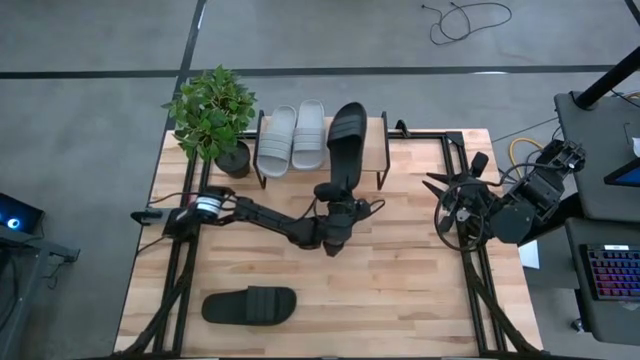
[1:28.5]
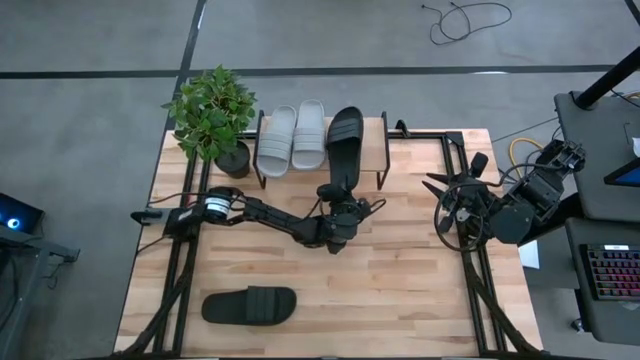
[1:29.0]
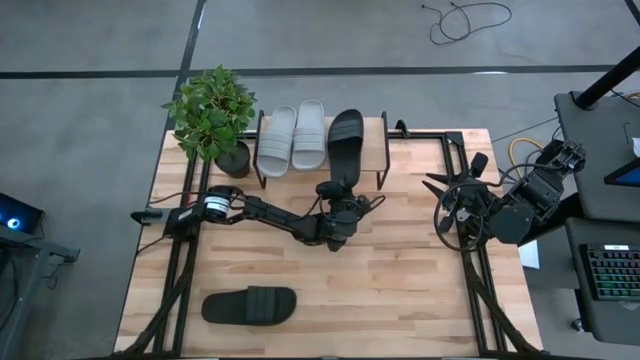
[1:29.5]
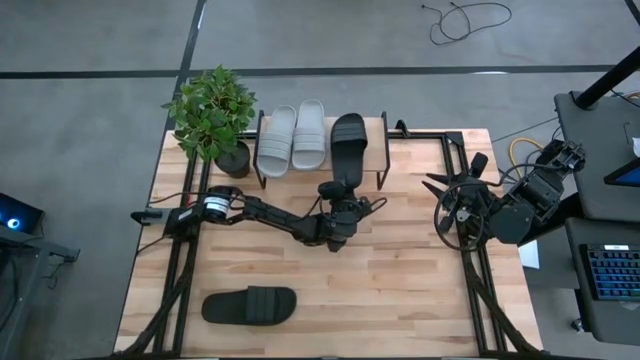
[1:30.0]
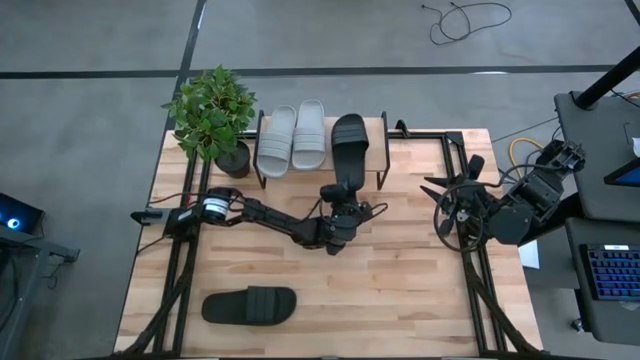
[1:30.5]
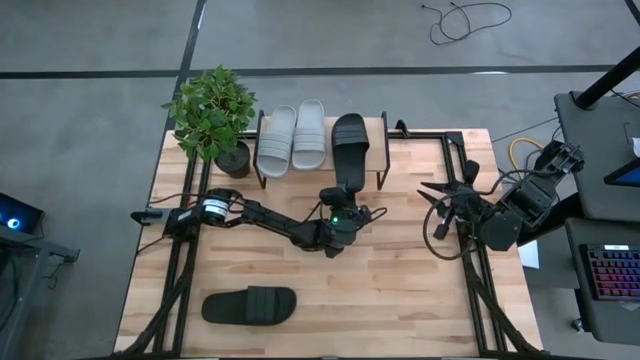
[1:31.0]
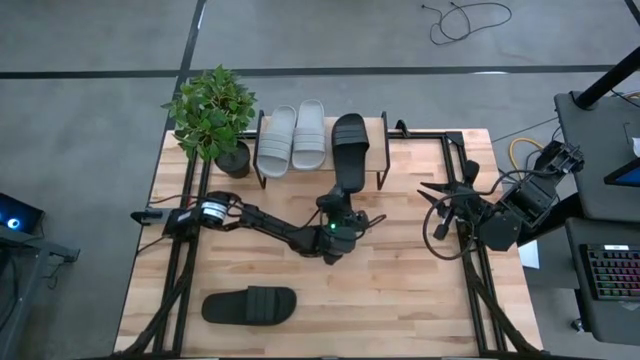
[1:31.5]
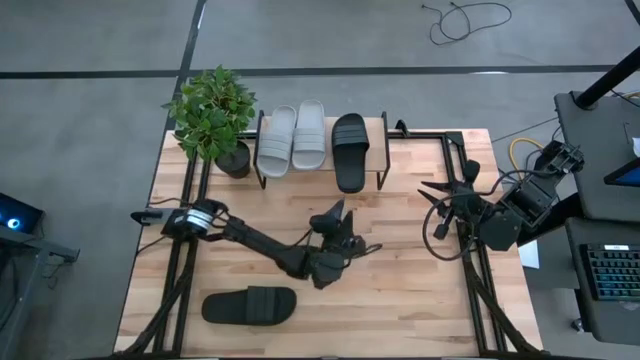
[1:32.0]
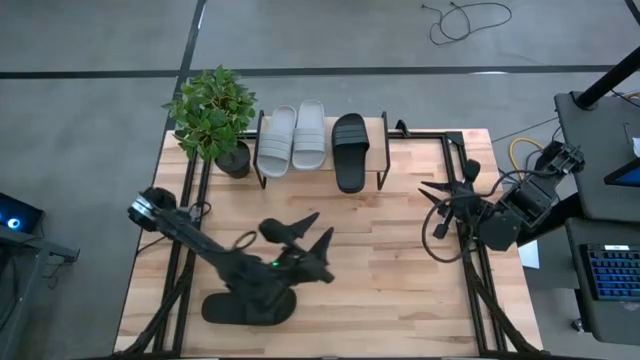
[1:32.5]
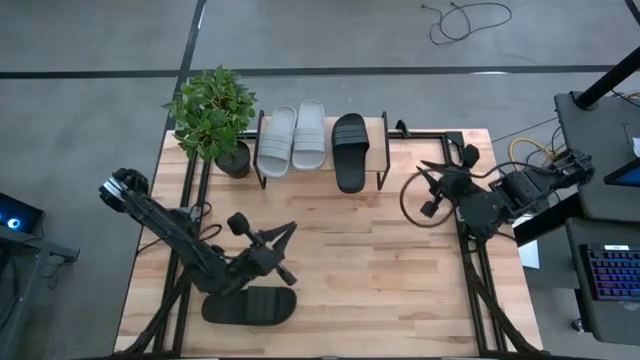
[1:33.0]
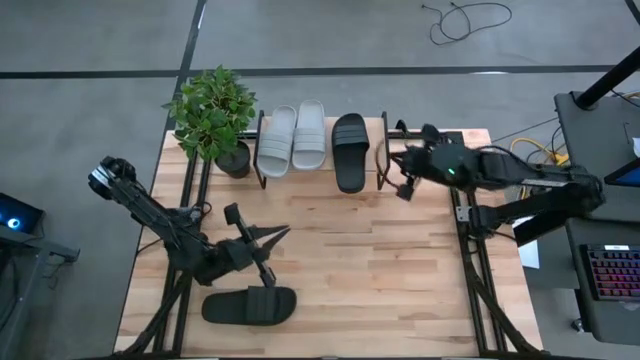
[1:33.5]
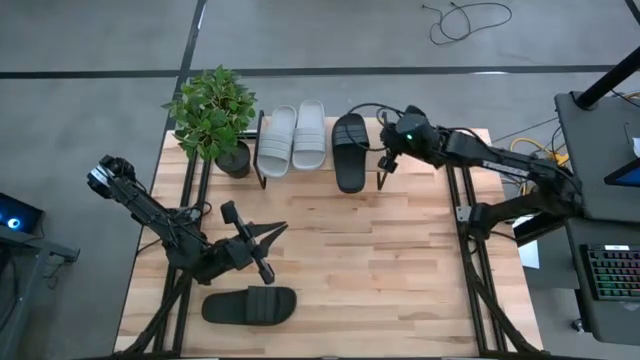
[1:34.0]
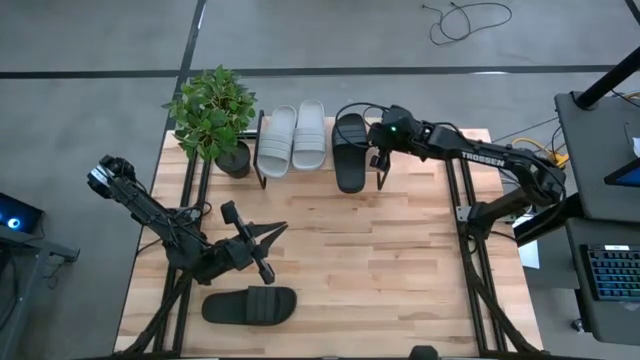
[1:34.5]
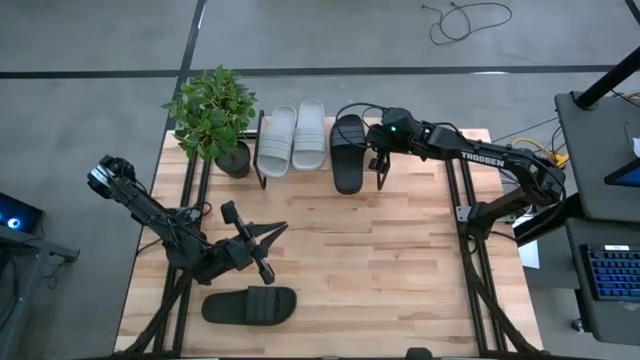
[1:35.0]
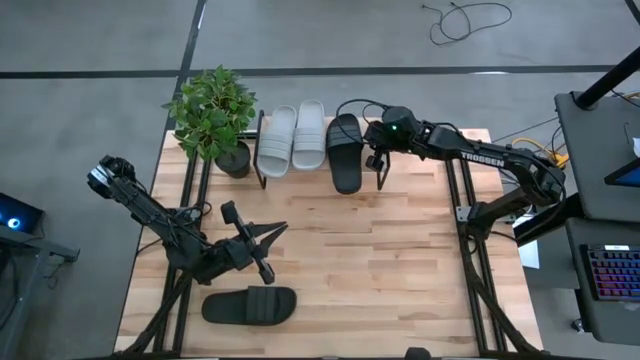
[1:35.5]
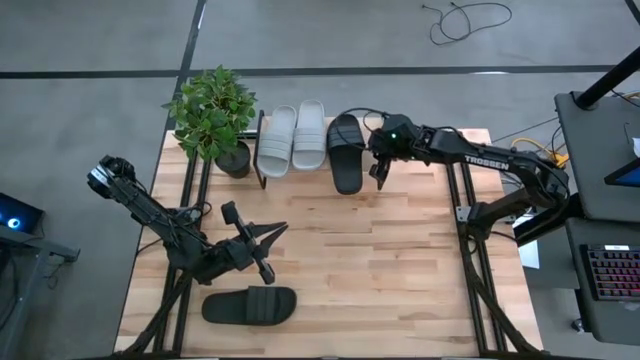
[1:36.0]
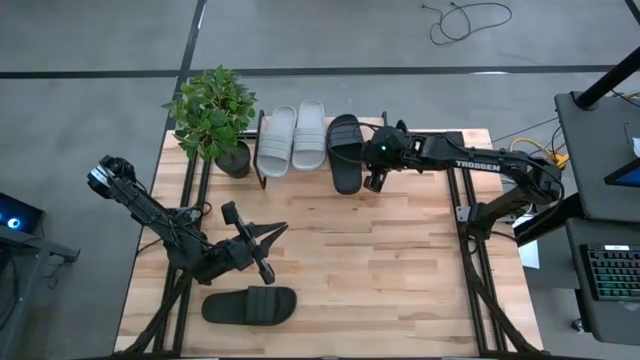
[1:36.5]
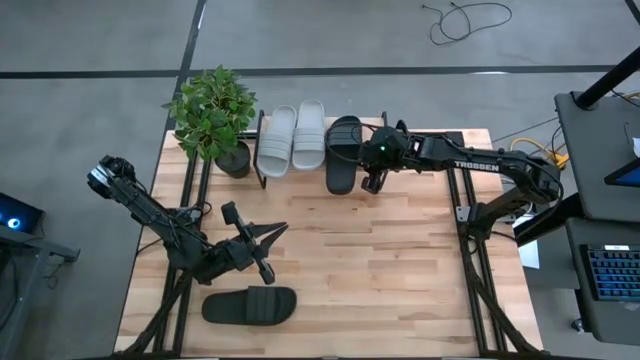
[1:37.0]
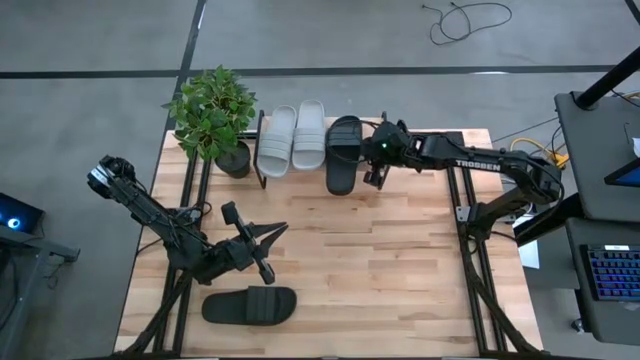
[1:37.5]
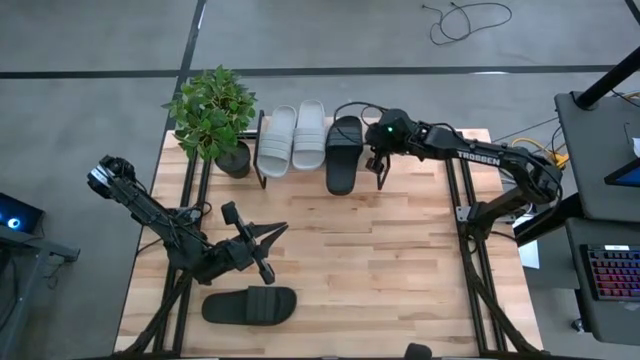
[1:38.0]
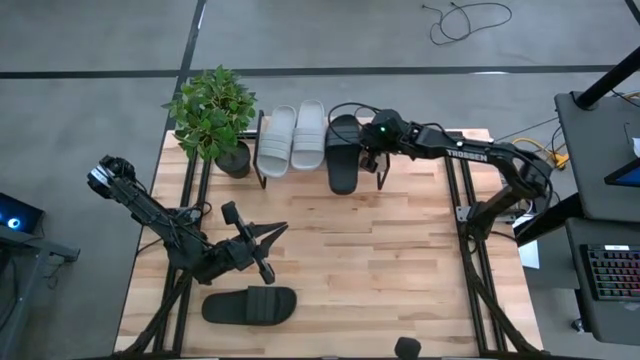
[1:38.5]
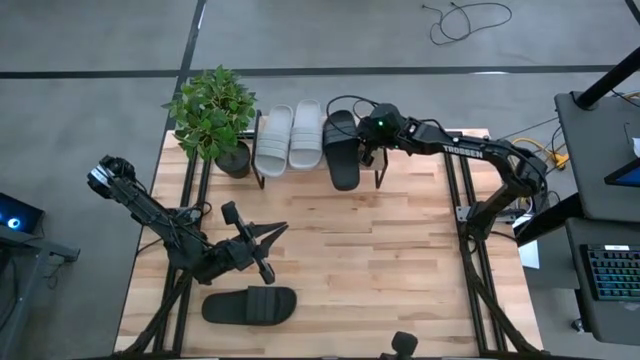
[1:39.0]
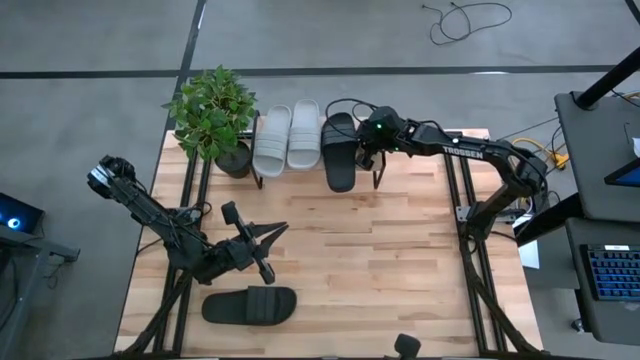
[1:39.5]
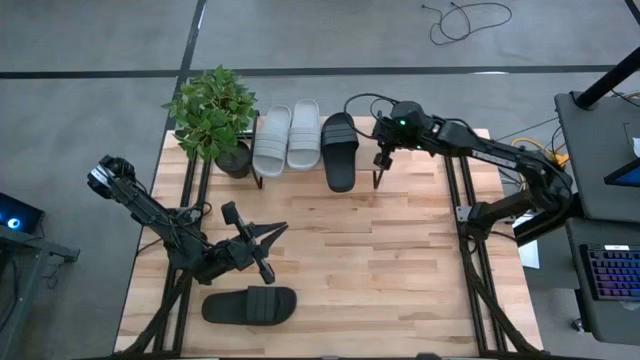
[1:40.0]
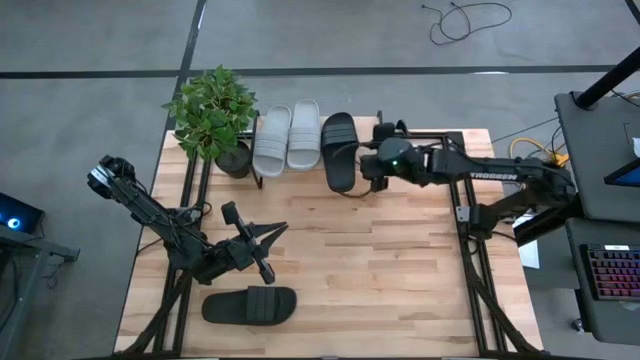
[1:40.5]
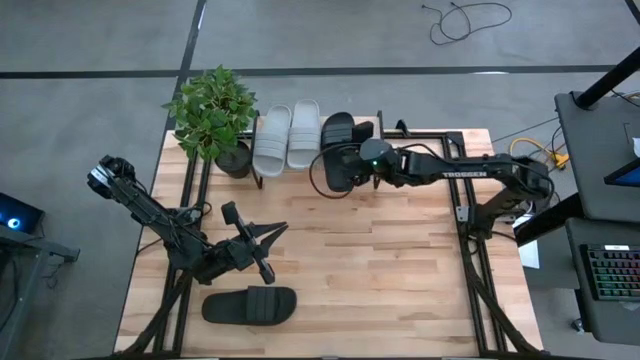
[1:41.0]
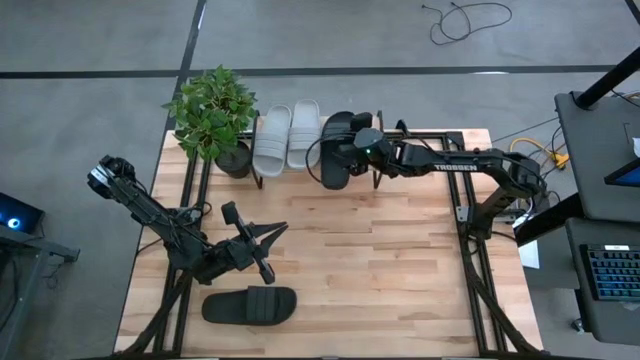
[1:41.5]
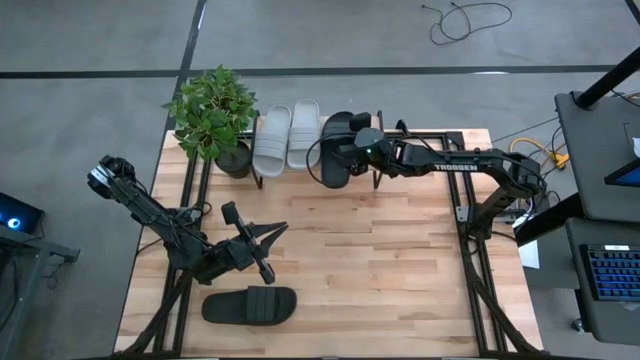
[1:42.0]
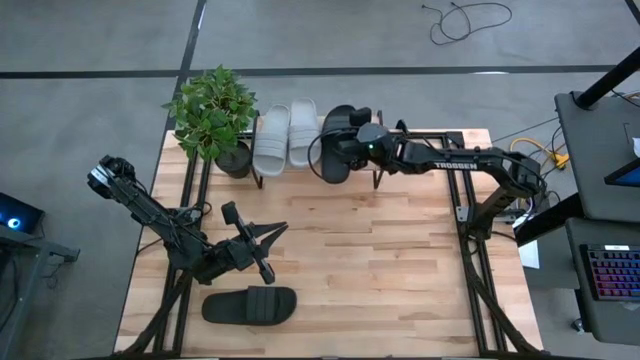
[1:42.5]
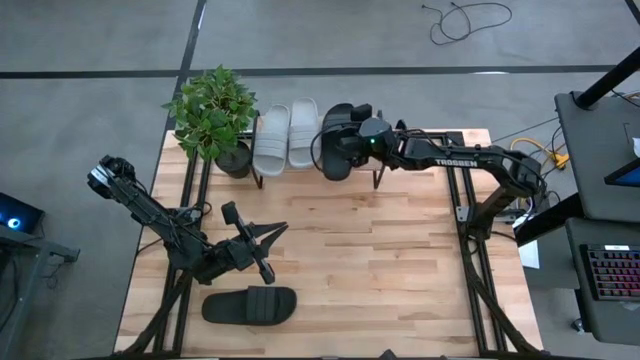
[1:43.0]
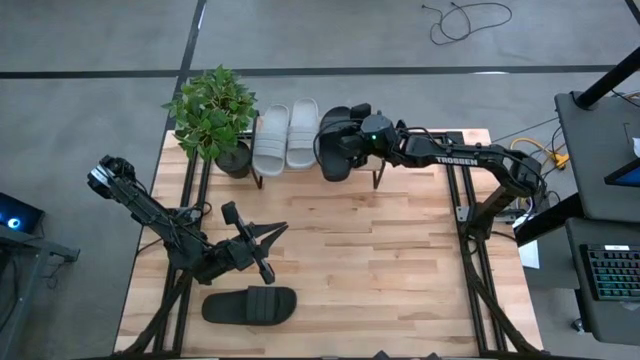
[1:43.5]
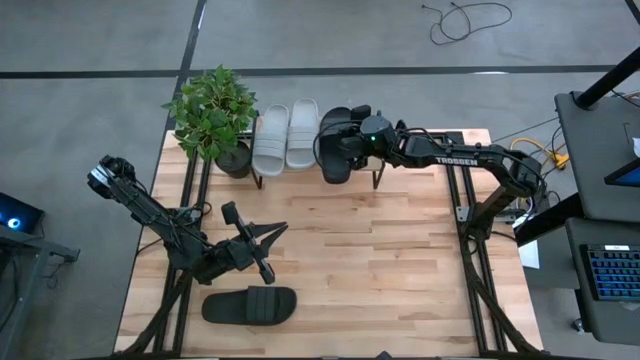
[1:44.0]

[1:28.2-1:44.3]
Task: Pick and place slides into the shelf
Put the right black slipper on the shelf

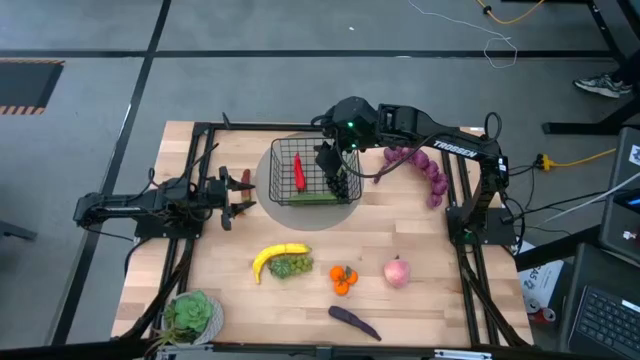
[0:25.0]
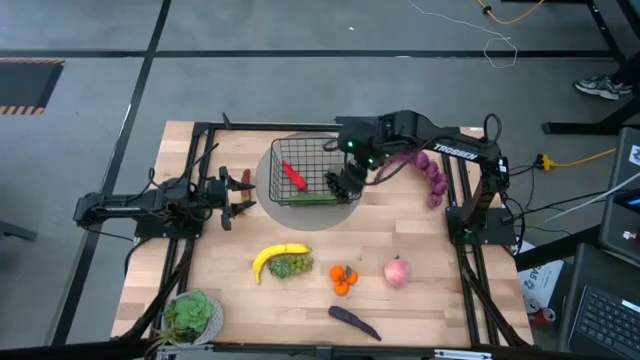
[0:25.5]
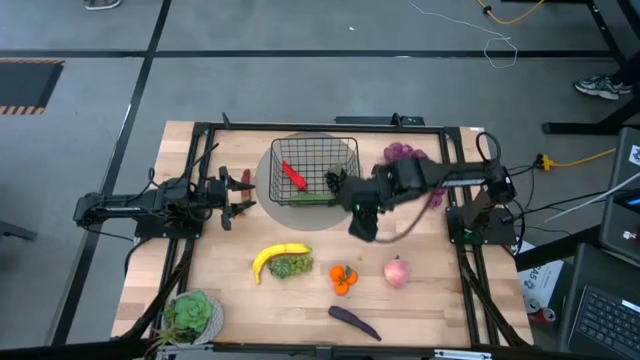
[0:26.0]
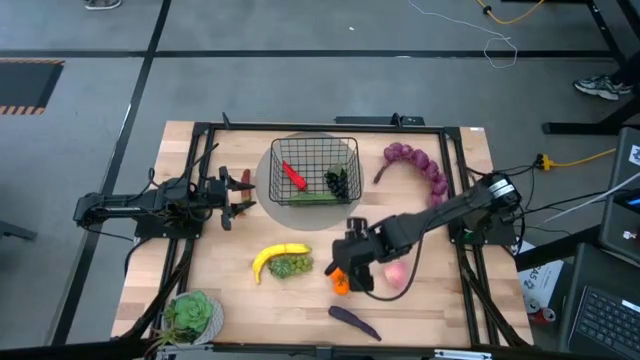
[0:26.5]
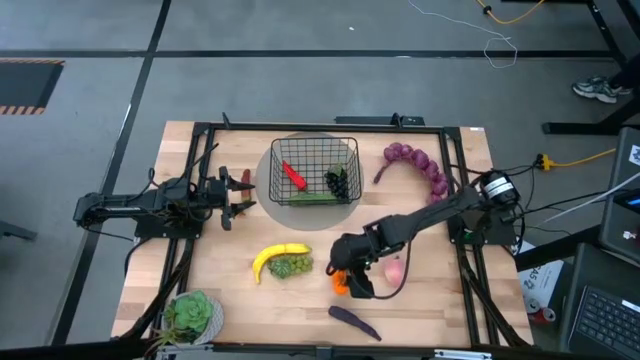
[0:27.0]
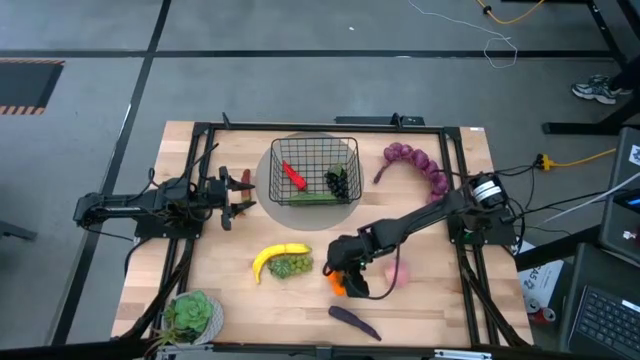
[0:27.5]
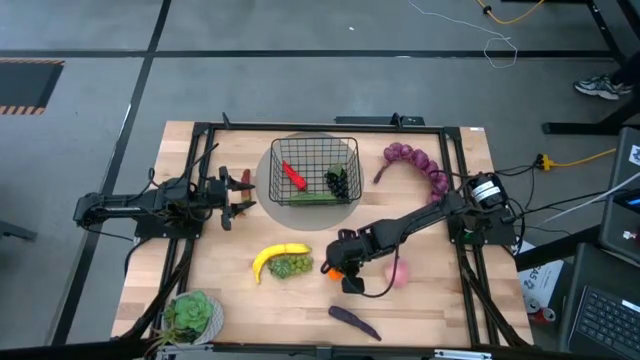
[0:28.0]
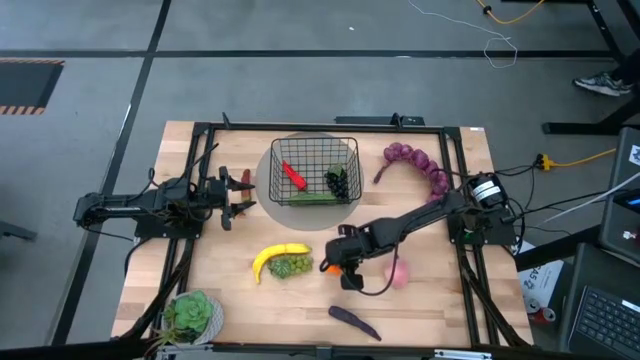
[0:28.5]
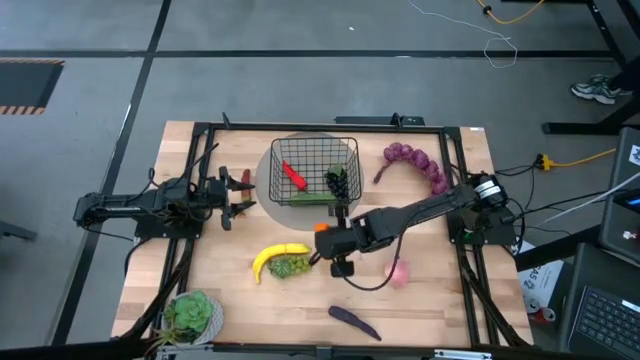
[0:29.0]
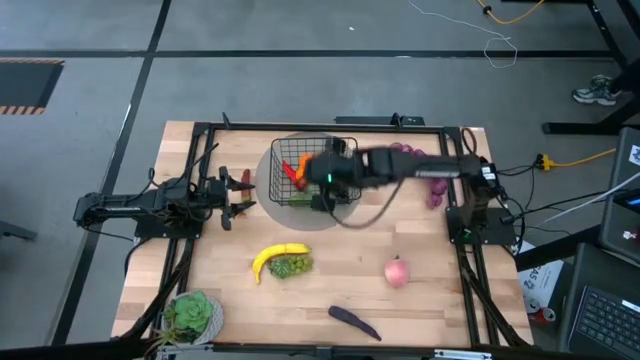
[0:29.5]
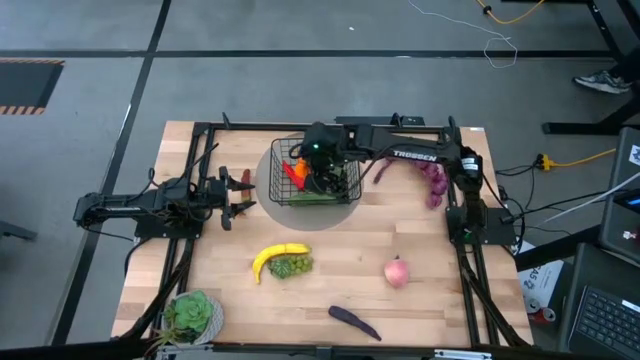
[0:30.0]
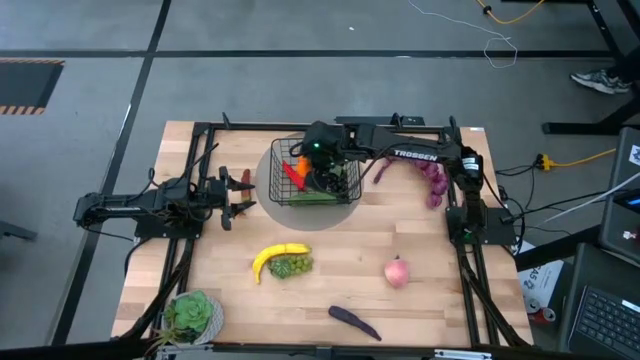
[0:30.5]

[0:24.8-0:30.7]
Task: Build produce basket
Put the orange tangerine into the wire basket
